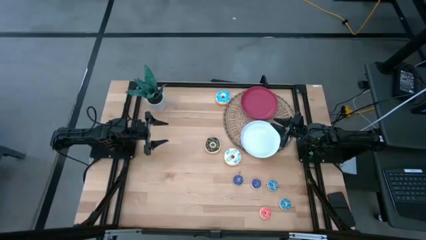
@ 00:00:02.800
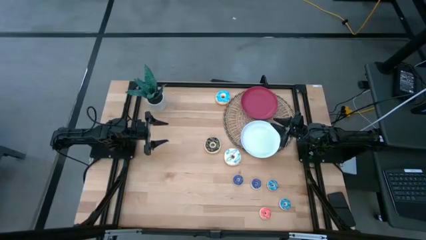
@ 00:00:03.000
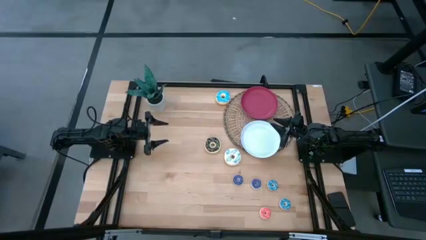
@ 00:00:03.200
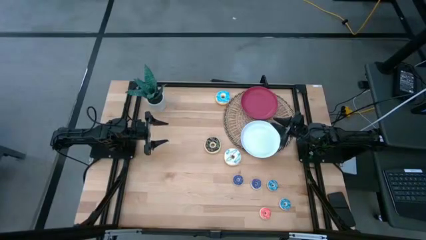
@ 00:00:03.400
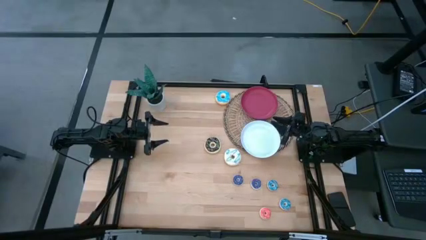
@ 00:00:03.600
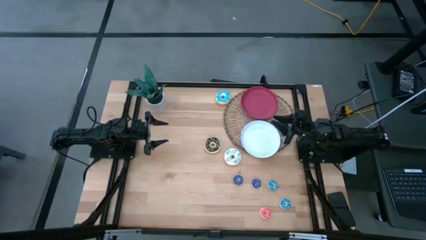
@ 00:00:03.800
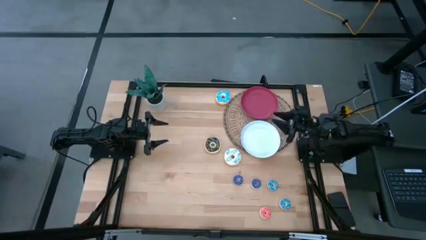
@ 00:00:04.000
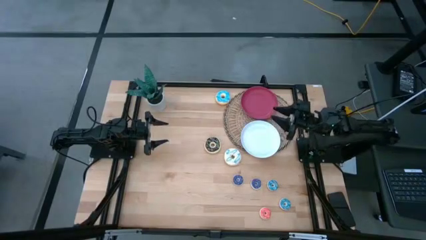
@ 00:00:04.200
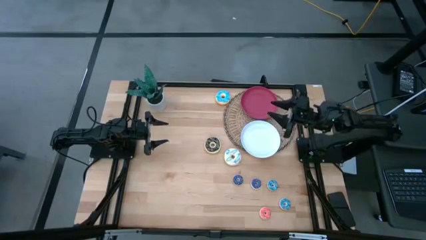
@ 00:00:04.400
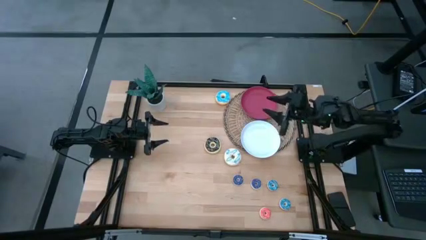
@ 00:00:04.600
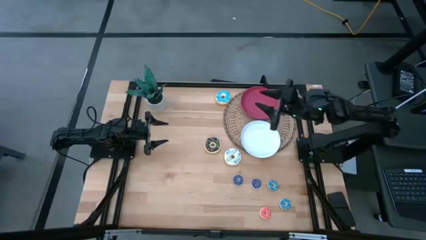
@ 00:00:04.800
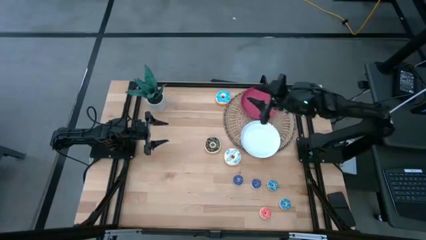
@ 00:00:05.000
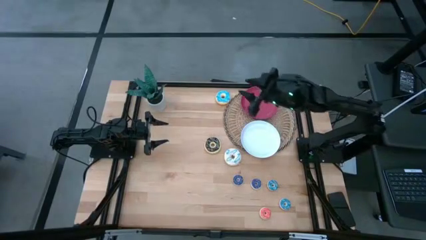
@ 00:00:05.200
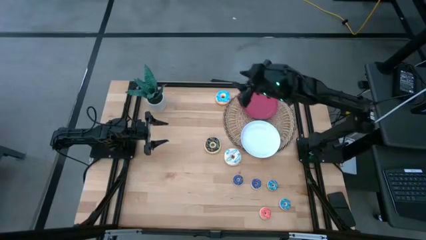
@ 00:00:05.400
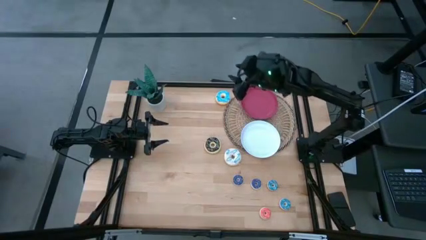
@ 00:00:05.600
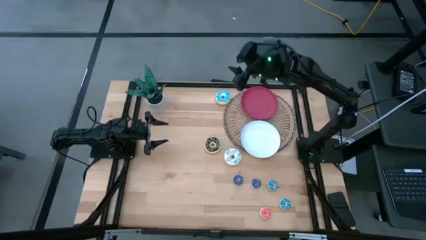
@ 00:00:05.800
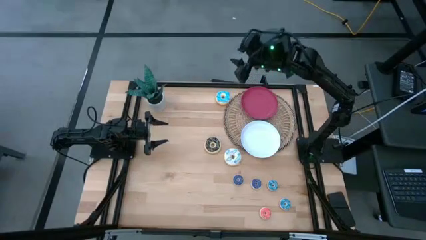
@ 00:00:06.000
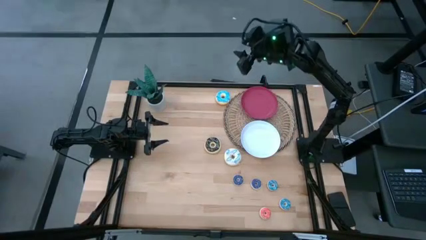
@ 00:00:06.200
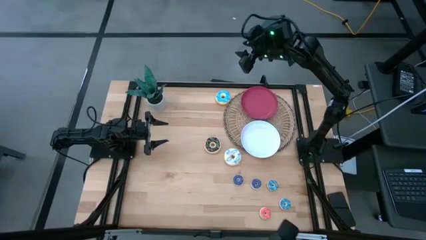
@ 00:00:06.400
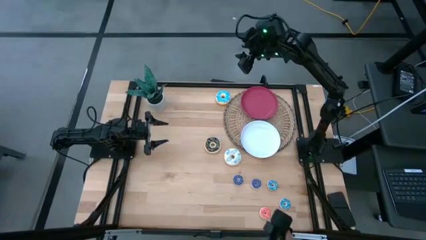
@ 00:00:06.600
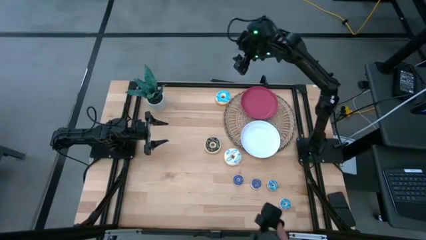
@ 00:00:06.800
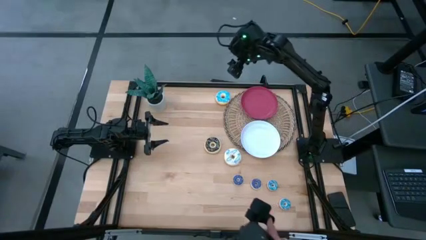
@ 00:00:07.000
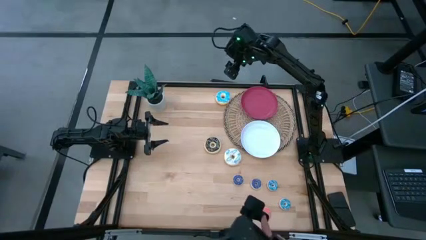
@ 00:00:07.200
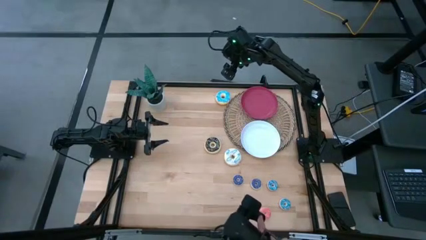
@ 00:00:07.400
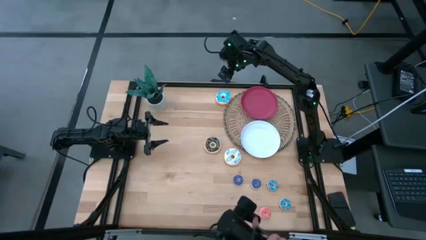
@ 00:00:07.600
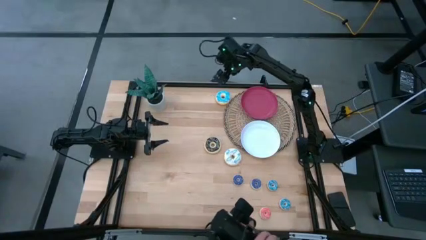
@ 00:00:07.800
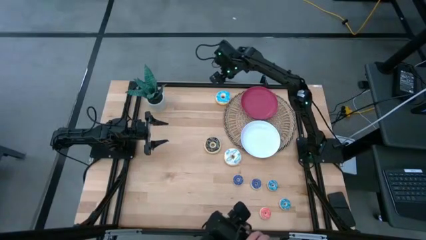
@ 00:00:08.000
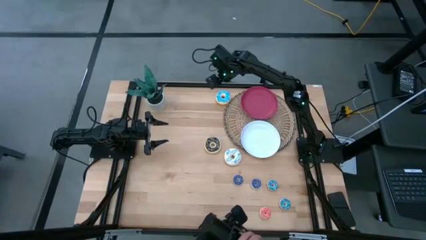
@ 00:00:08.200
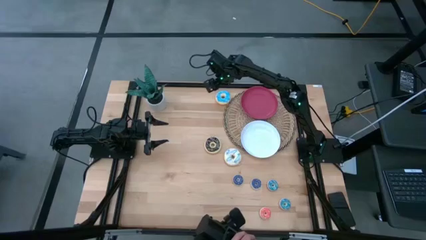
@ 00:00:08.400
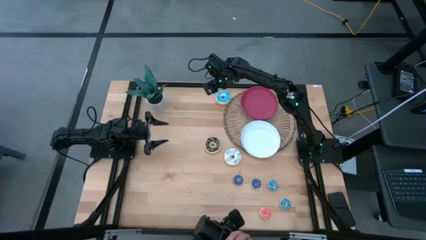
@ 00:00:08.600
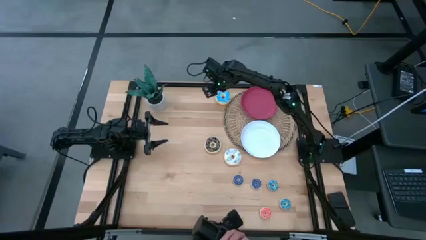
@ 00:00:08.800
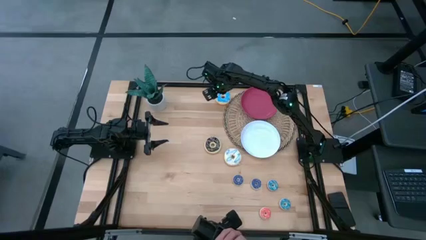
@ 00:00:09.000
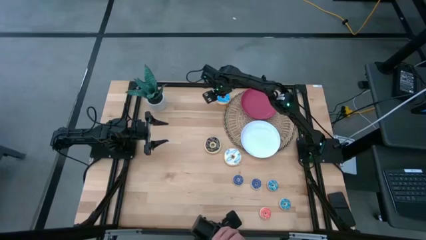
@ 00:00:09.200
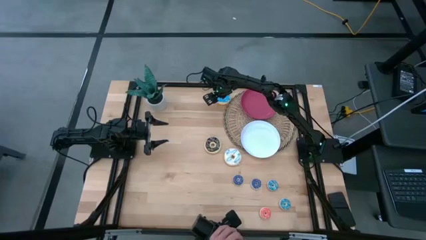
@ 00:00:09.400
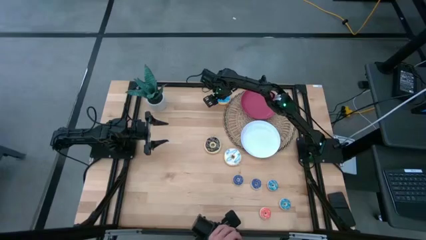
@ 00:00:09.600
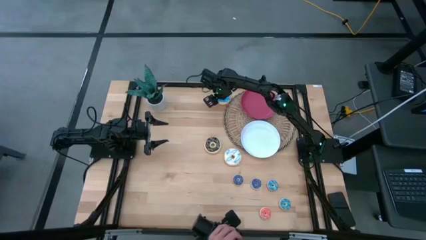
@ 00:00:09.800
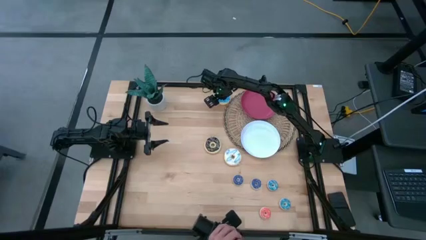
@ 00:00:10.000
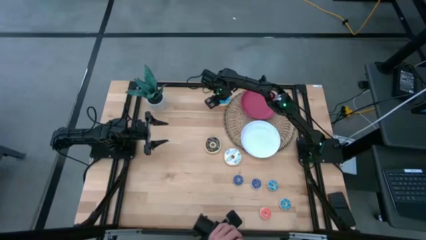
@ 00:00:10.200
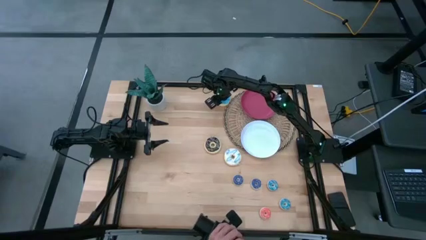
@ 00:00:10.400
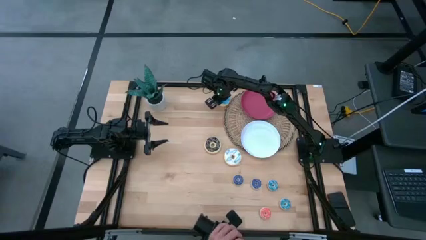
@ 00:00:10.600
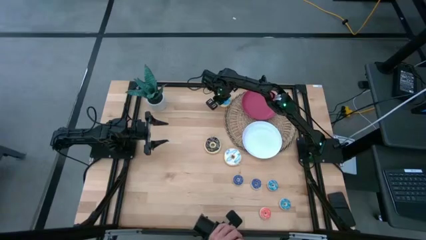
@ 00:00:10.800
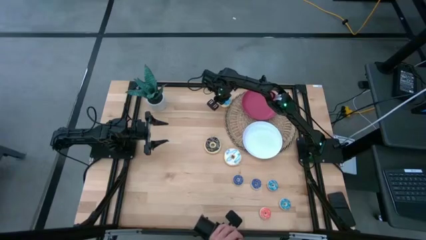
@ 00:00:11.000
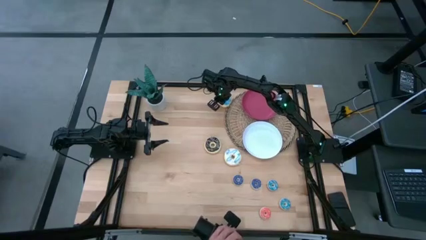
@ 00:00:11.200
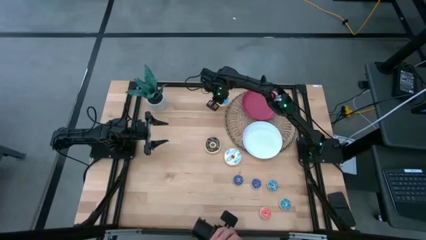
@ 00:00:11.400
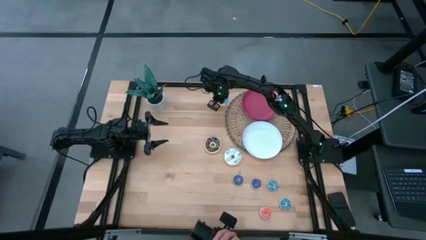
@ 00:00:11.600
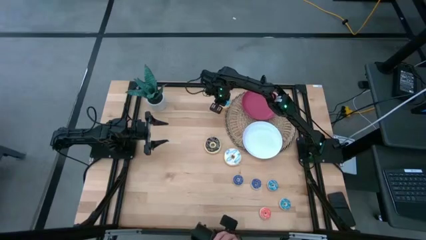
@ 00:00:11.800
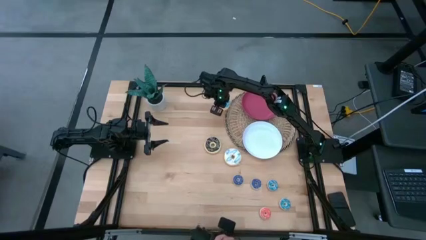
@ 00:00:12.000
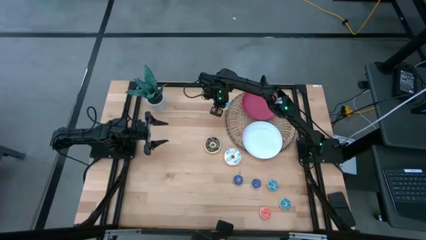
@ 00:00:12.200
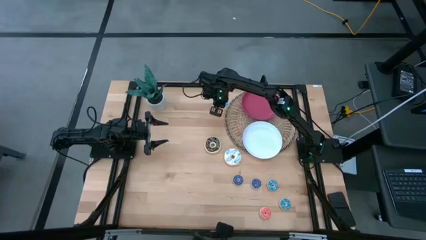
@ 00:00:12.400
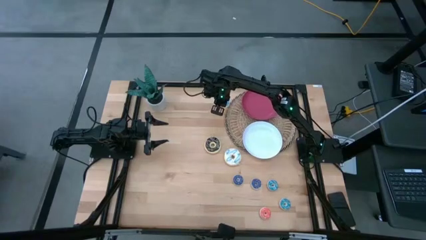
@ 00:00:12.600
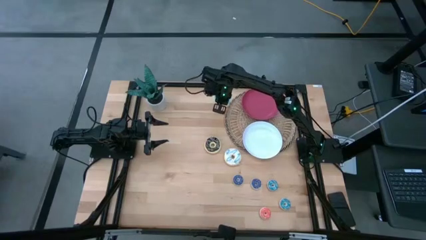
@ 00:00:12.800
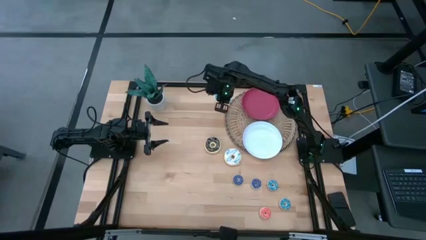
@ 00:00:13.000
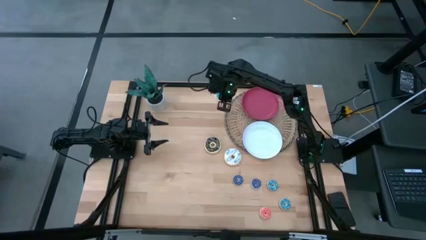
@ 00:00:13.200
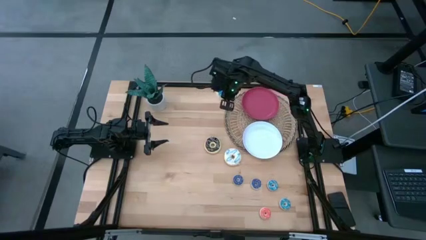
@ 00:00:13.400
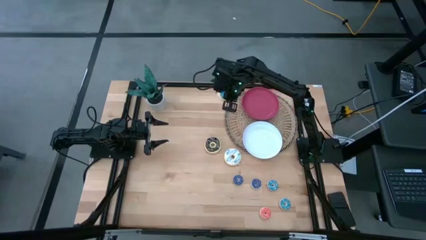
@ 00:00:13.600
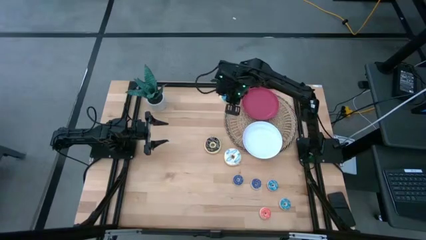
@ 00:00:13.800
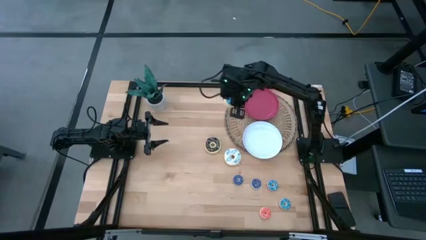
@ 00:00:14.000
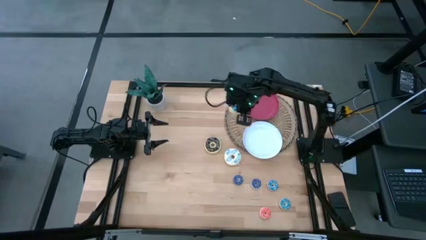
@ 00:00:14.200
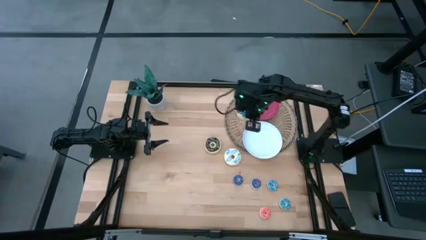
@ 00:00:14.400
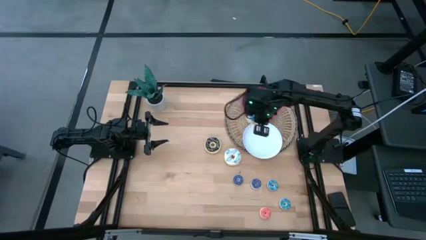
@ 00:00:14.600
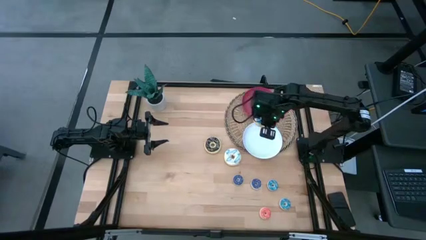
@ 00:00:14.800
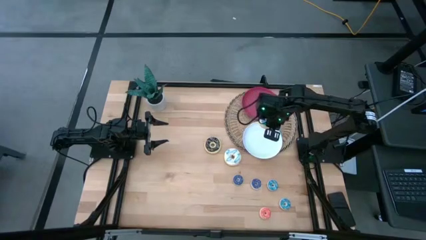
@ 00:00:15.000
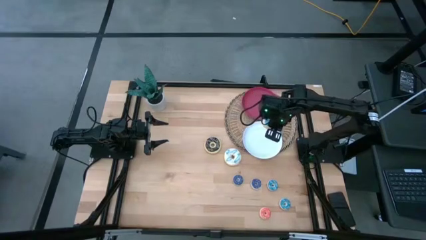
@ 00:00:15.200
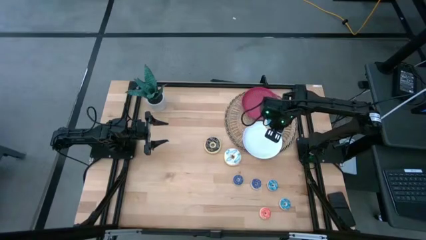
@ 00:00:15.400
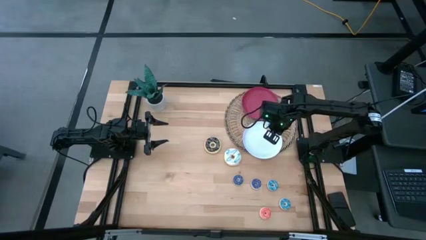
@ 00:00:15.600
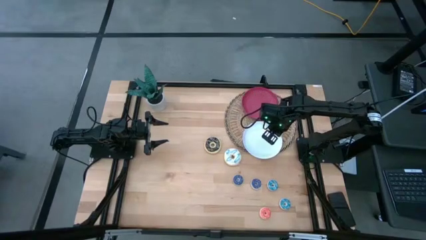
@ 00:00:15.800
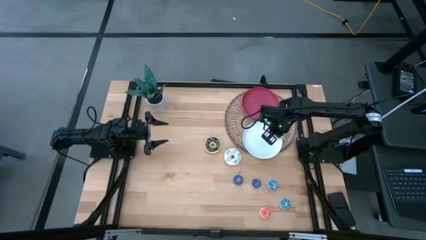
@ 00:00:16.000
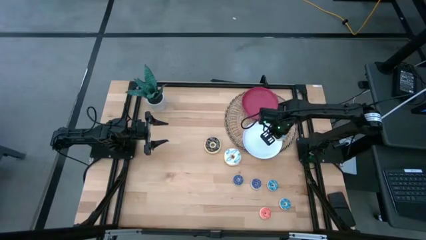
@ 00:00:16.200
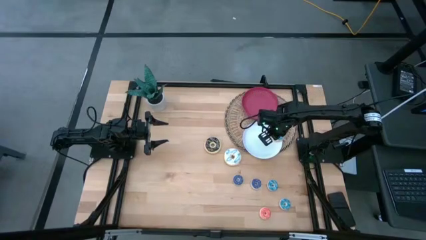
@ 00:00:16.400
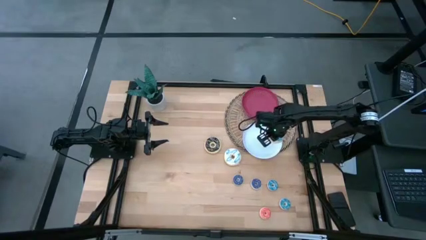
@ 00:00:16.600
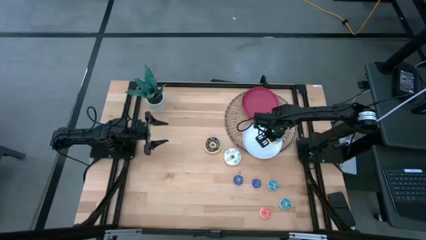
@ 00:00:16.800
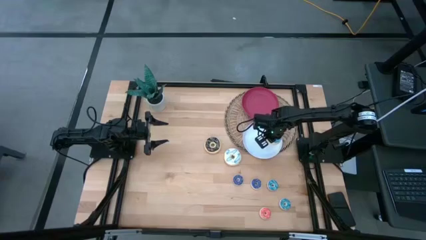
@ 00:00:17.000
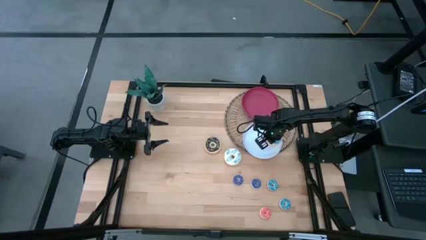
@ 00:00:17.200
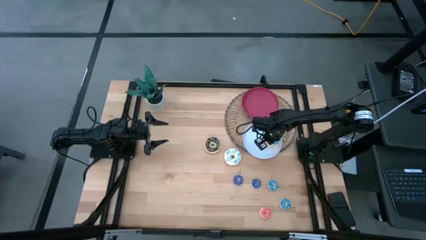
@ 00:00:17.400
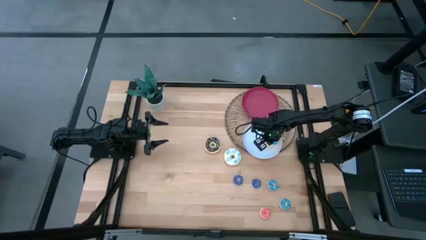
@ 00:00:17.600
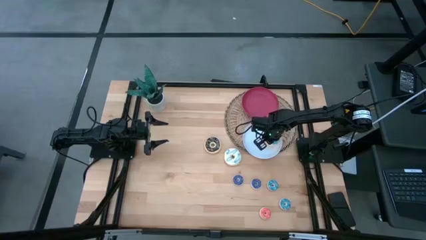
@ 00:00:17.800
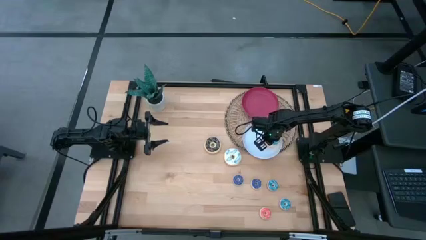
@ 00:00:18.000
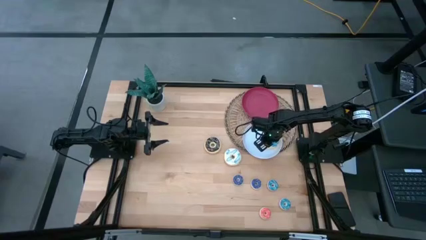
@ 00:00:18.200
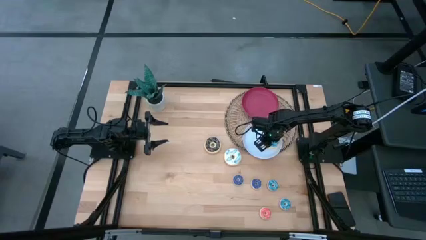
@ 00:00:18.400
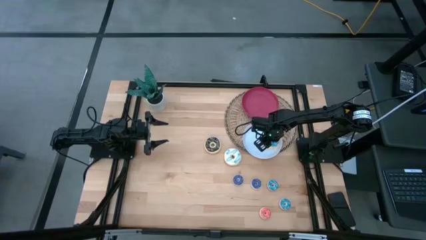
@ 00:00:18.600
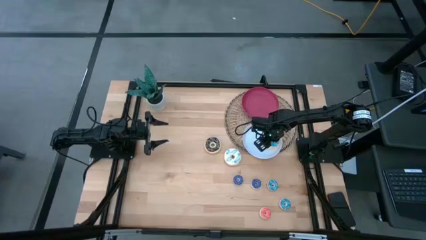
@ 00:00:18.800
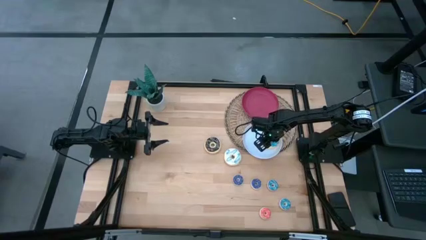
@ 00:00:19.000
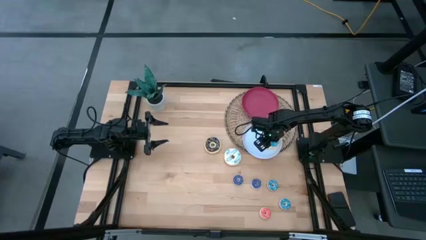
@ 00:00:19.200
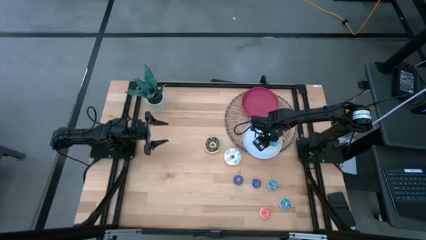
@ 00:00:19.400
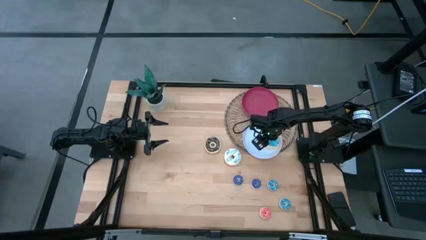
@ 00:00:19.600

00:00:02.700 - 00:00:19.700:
Task: Pick & Place donuts
Put the big blue donut on the white plate
